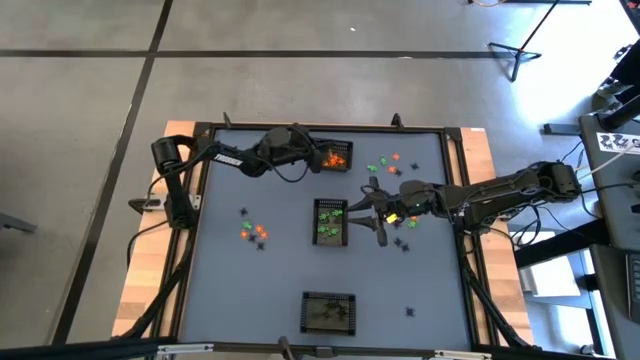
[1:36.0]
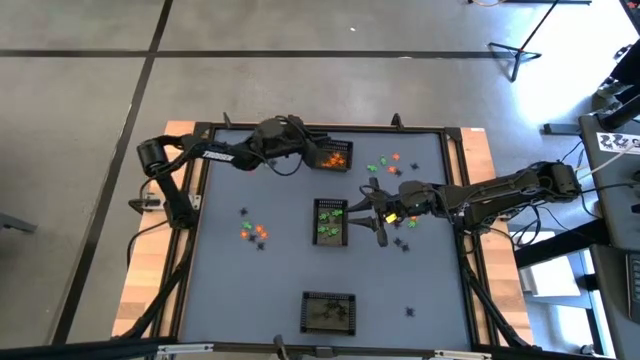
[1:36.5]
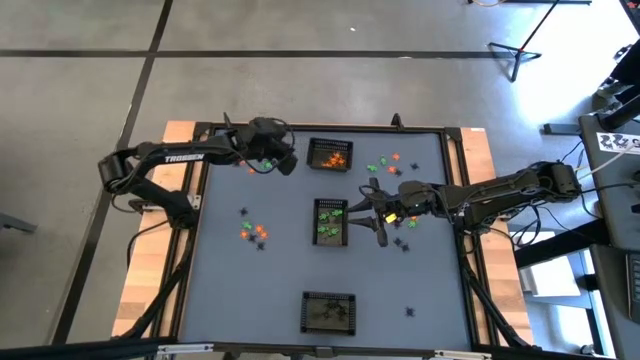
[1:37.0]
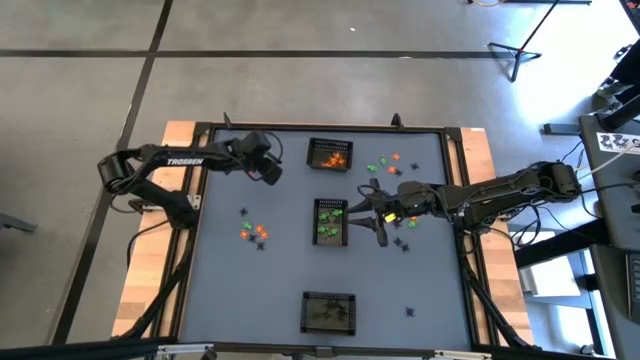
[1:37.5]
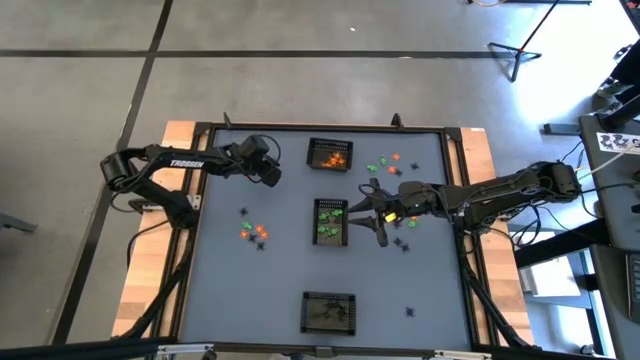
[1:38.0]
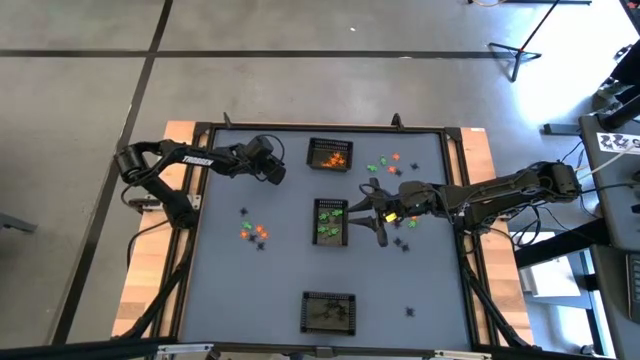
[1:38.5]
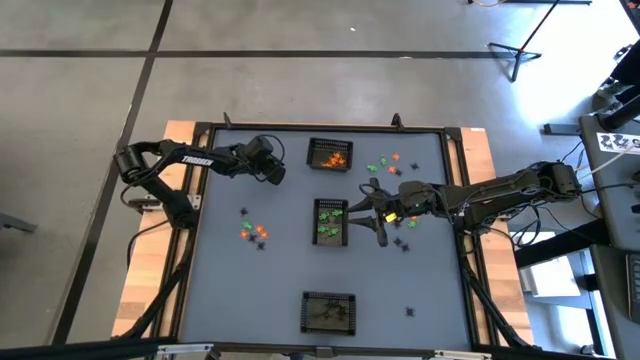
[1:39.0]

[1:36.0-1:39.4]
Task: Sort Halloween decoration
Put the green skeleton toy into the center black bin

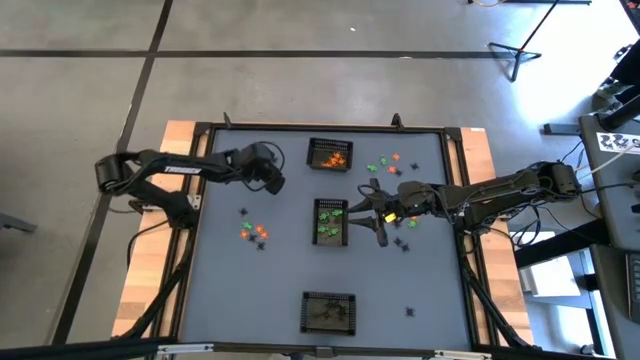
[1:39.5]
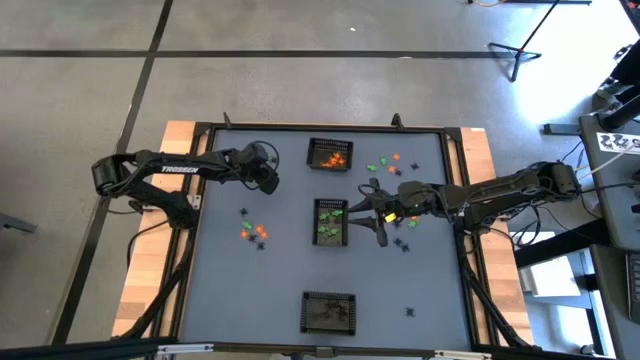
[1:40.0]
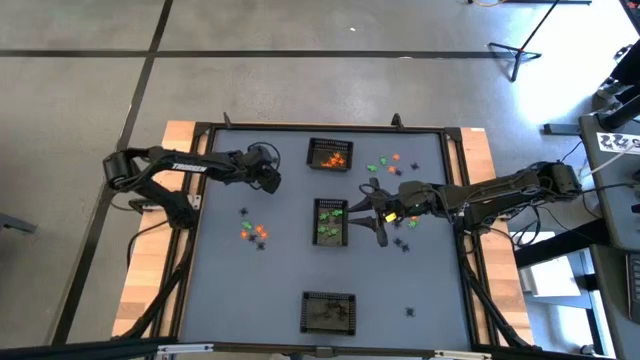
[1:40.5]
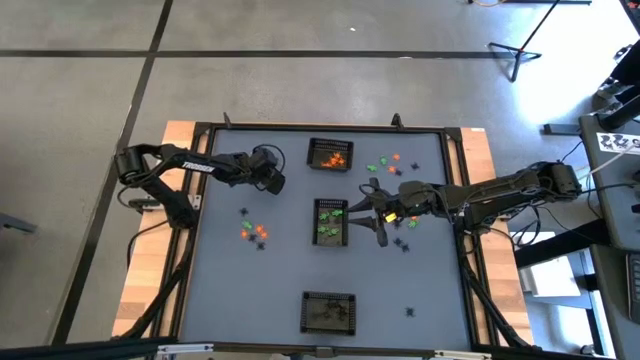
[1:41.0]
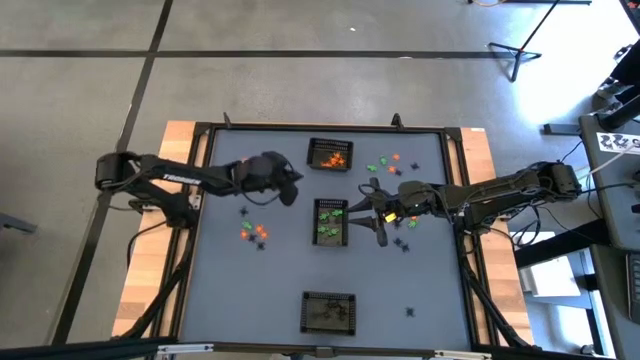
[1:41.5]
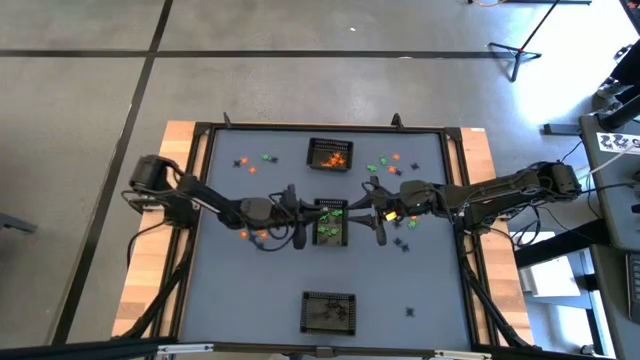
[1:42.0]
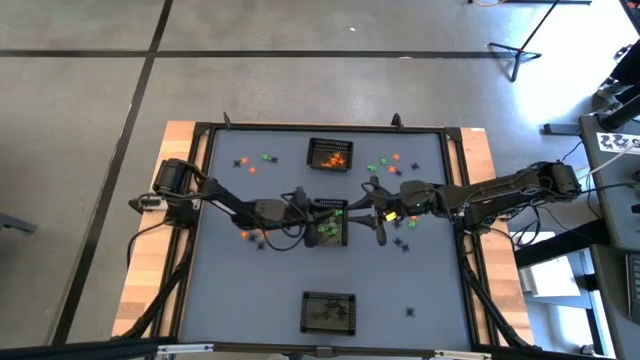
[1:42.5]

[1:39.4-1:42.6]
Put the green skeleton toy into the center black bin

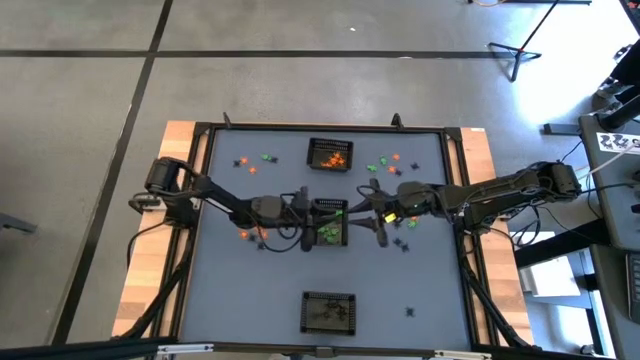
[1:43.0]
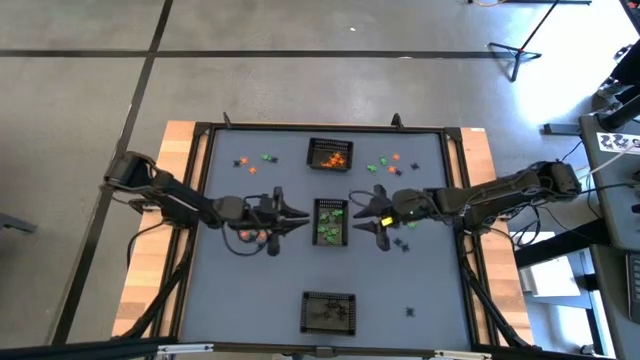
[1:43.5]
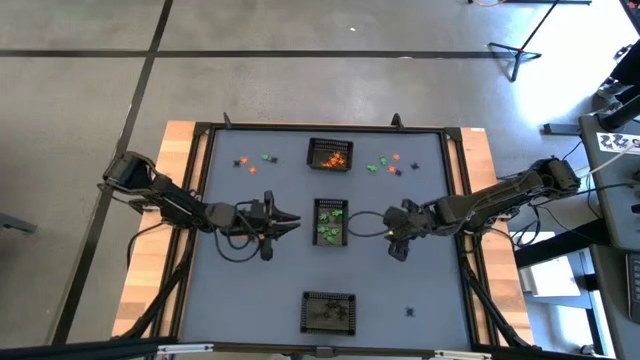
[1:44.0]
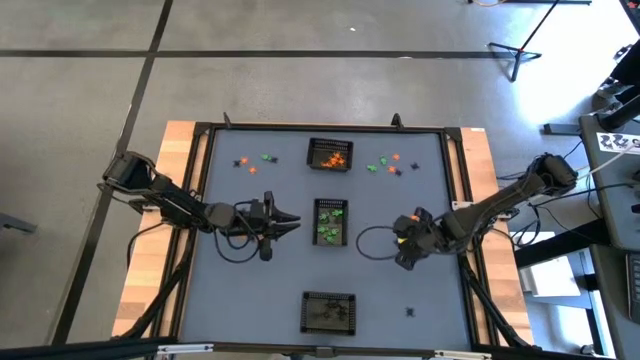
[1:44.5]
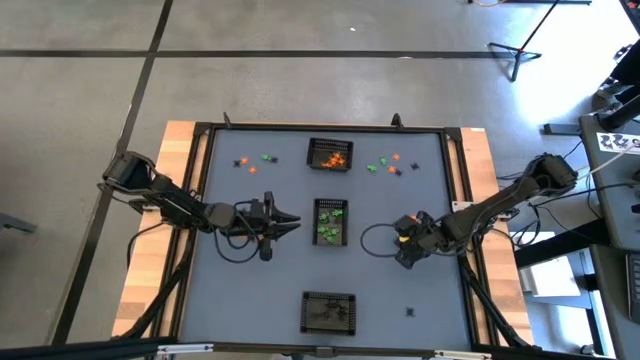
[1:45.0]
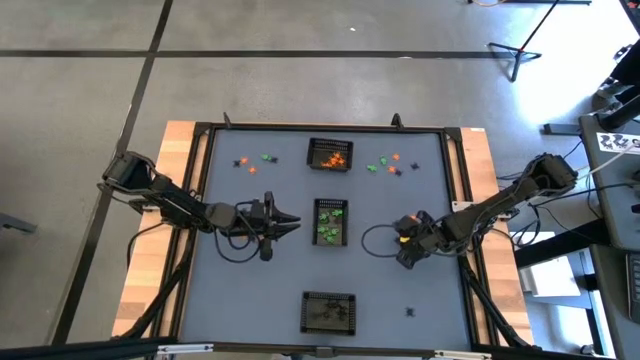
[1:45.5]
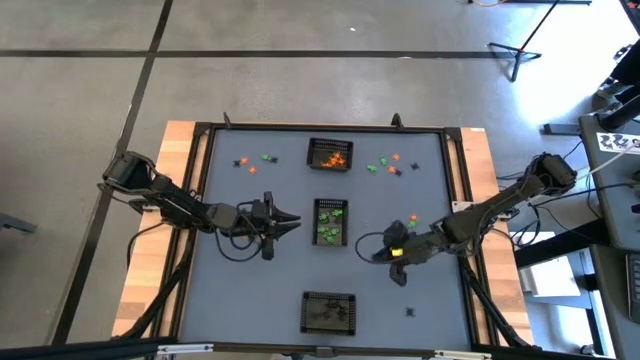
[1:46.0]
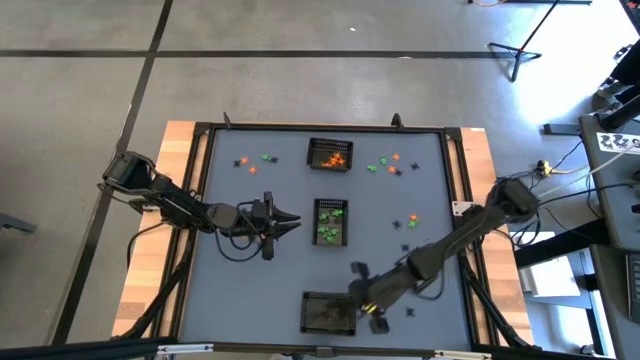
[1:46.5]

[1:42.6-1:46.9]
Put the black spider toy into the bottom black bin

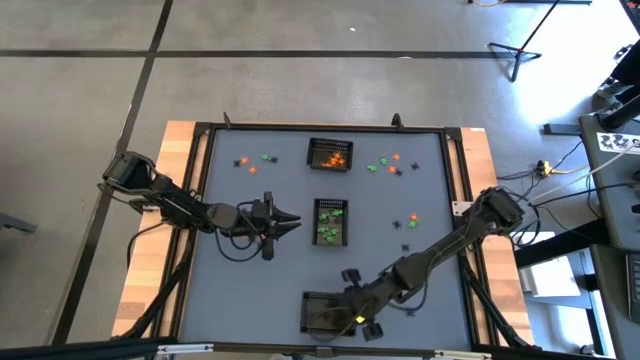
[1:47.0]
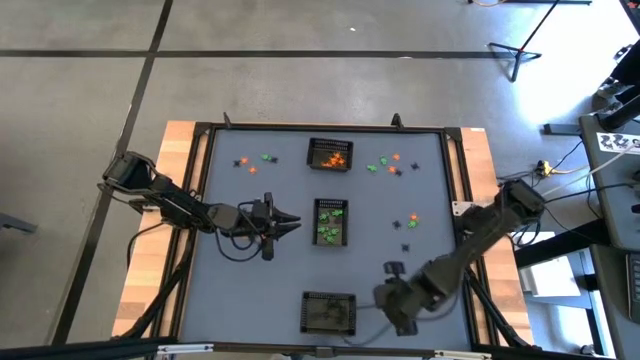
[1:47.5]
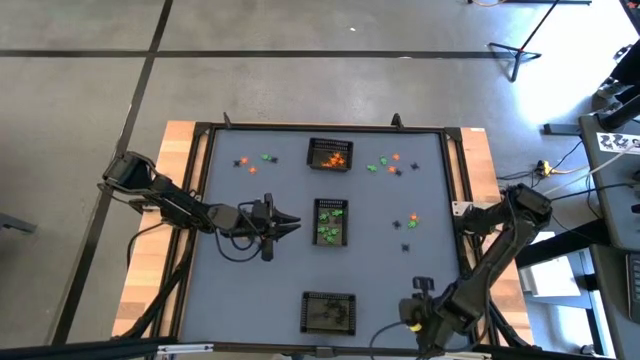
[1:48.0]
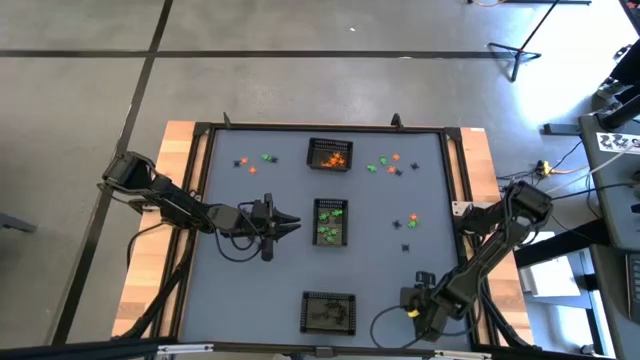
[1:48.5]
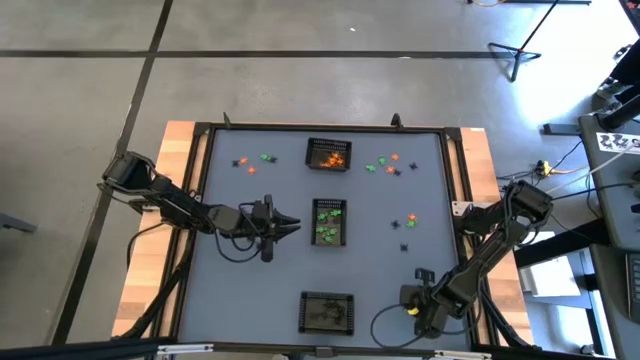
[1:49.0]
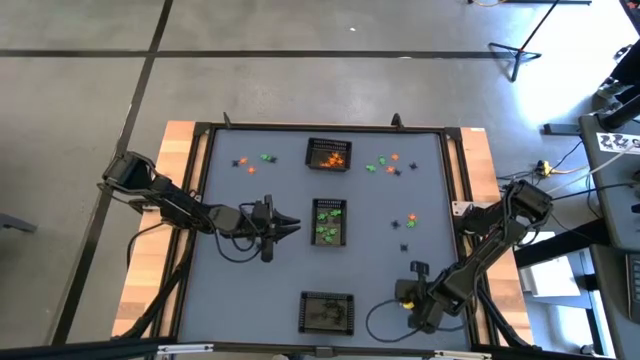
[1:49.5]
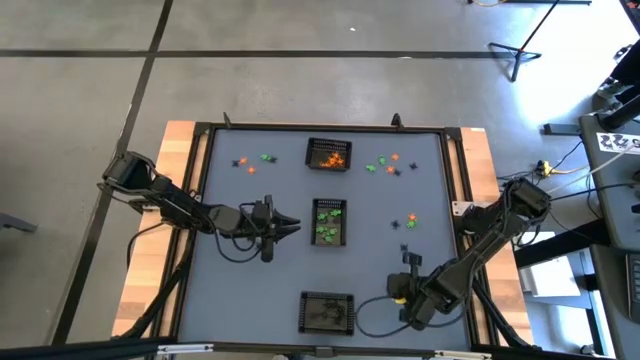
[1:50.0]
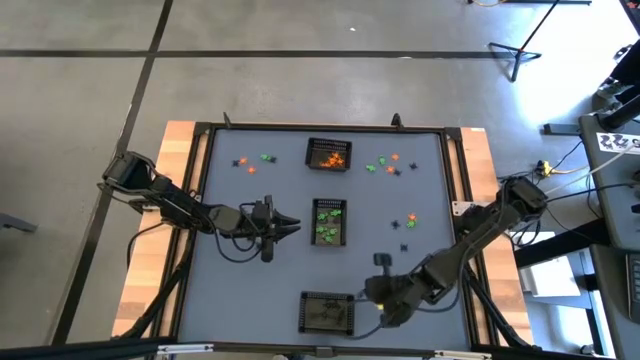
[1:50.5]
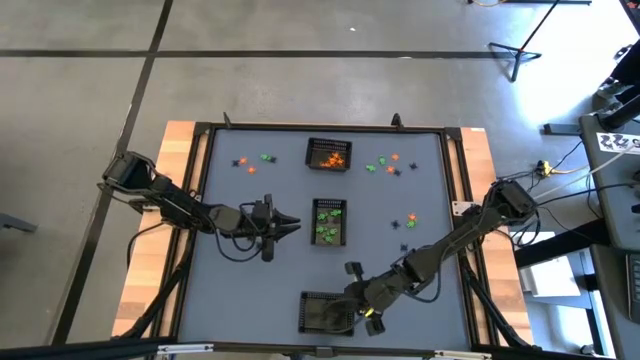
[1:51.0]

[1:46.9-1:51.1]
Put the black spider toy into the bottom black bin

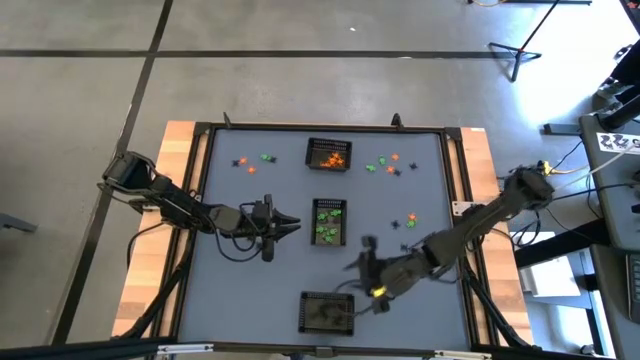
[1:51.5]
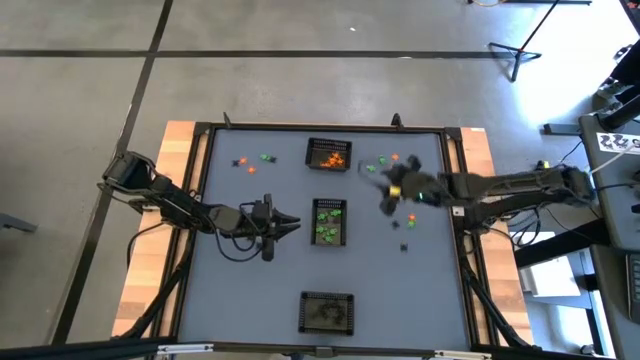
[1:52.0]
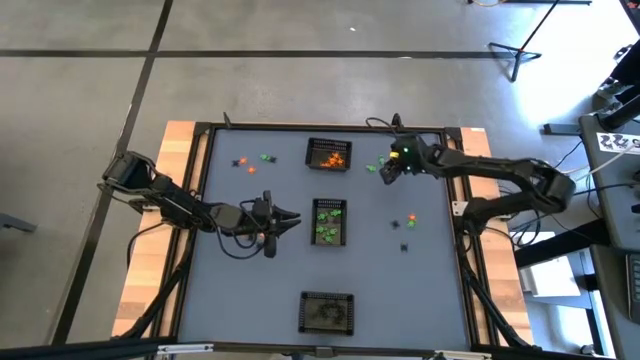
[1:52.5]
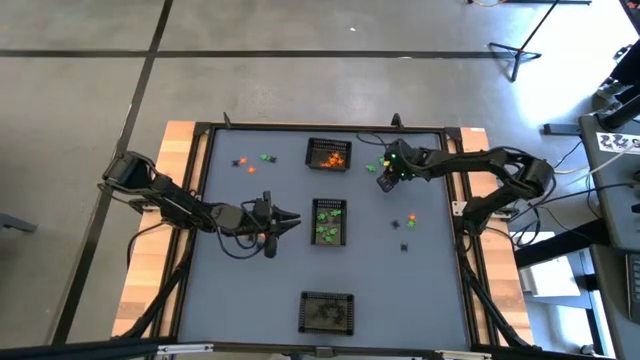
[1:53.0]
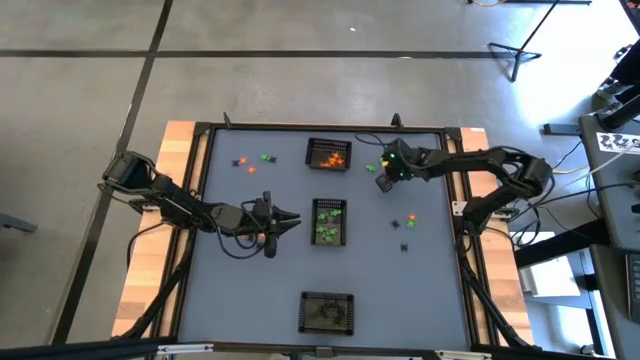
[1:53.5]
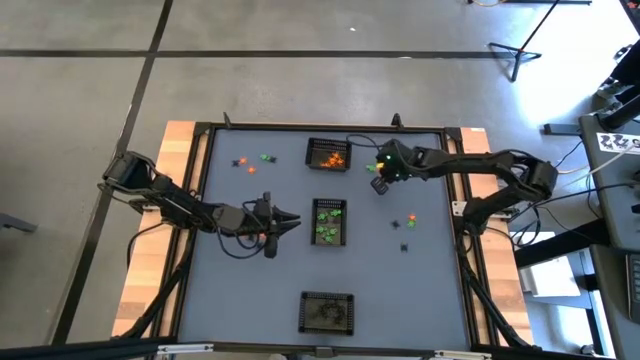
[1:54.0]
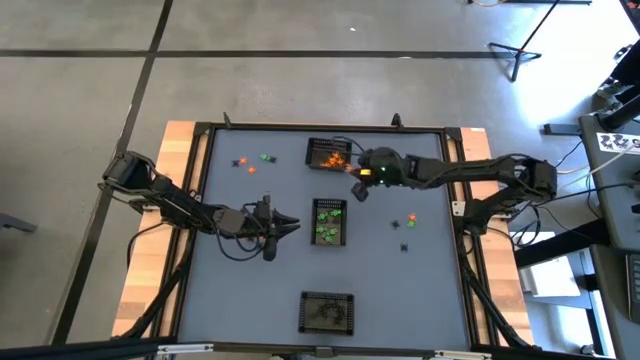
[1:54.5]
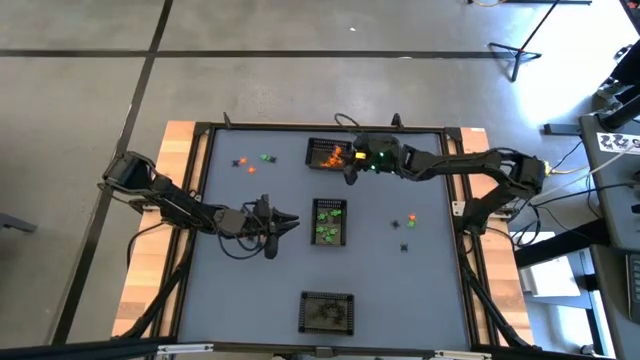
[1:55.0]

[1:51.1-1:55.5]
Put the orange spider toy into the top black bin

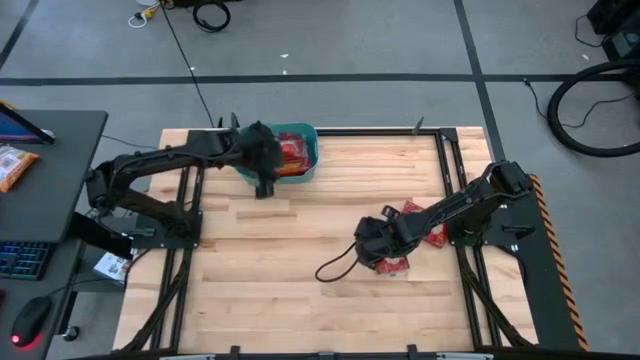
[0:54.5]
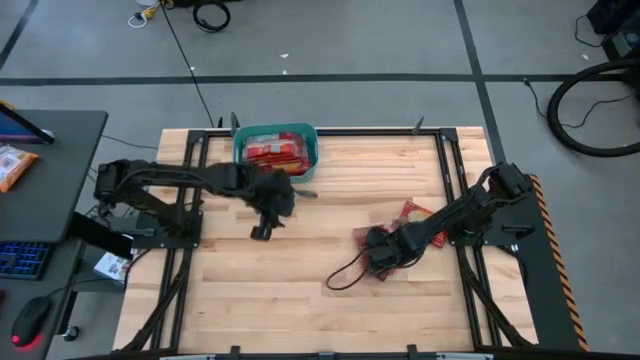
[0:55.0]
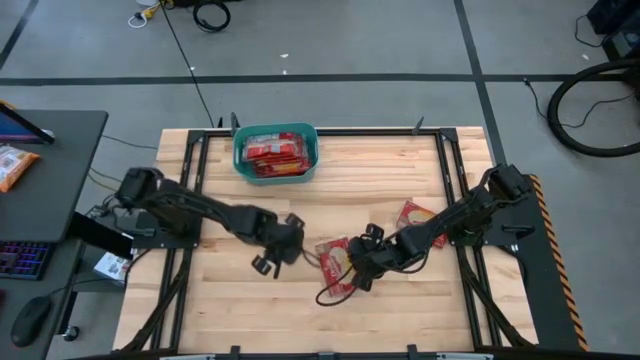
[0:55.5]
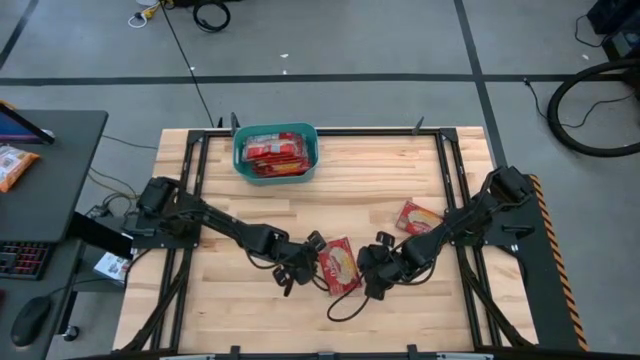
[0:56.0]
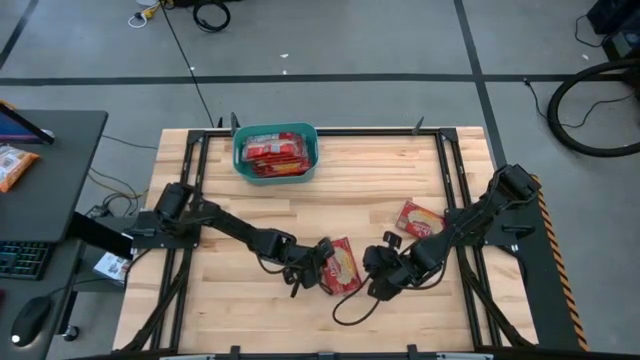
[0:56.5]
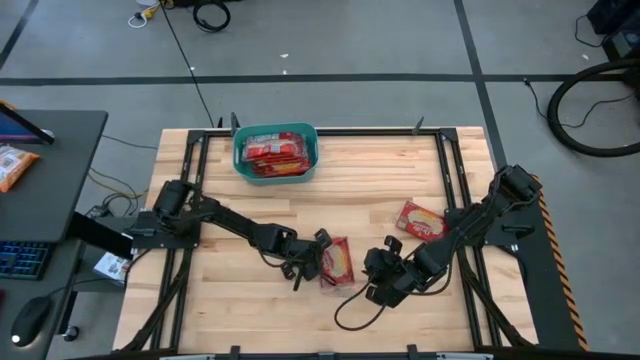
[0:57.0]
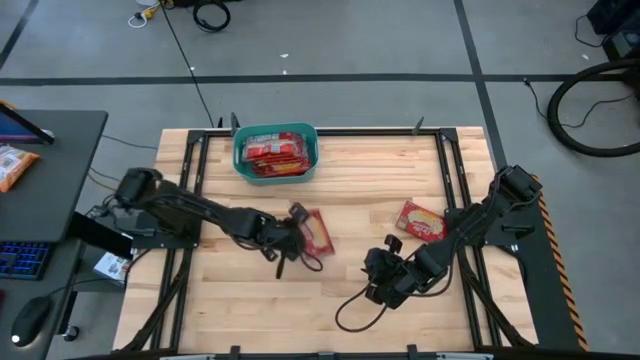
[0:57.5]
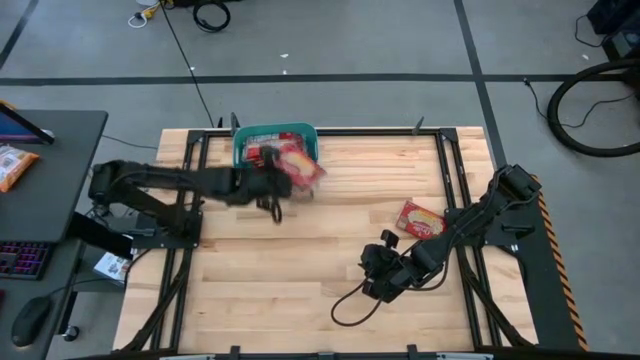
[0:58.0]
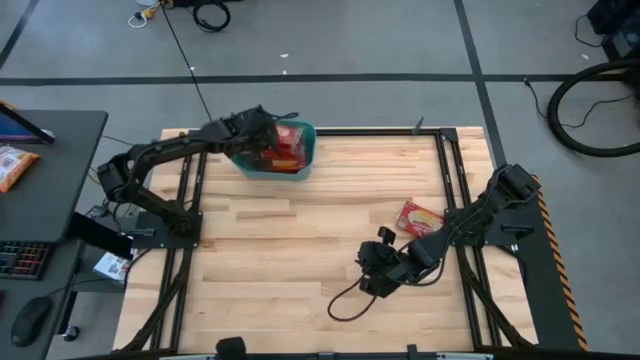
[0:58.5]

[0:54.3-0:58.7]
Task: Sort popcorn bags into baskets
Put the red popcorn bag into the green bin
